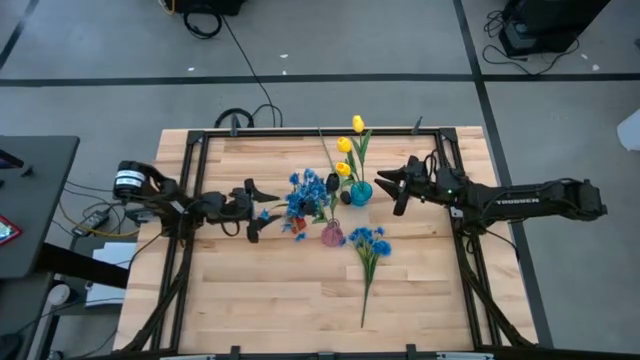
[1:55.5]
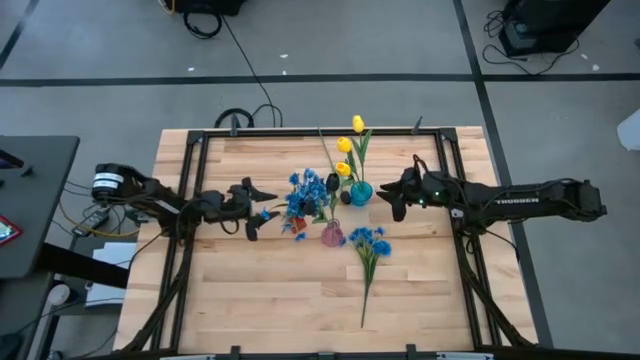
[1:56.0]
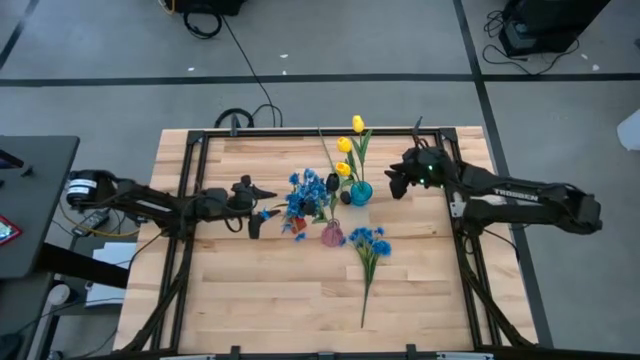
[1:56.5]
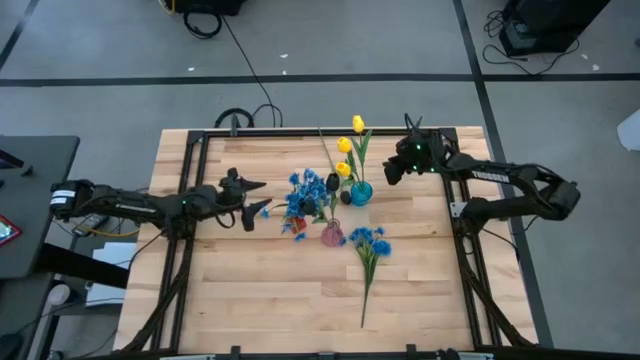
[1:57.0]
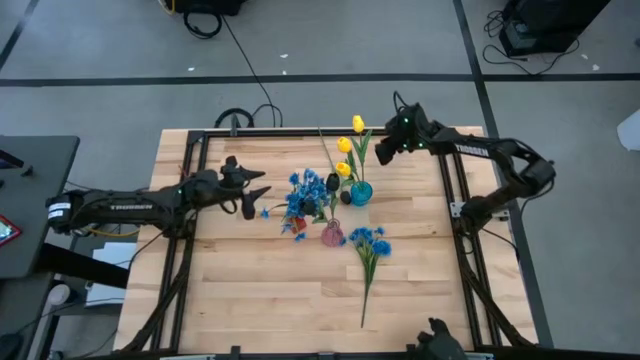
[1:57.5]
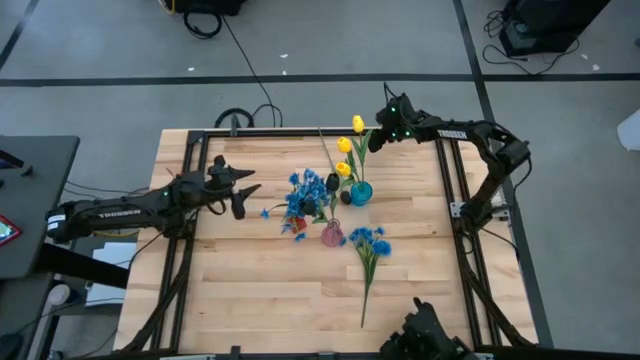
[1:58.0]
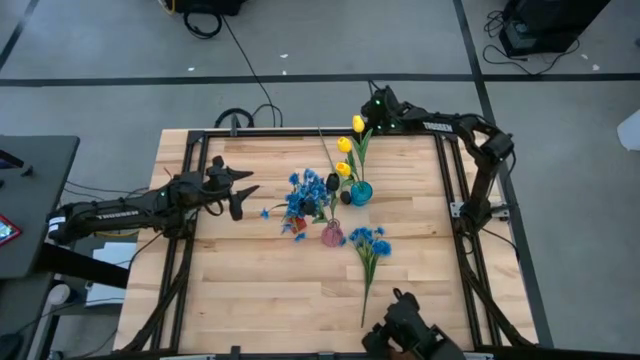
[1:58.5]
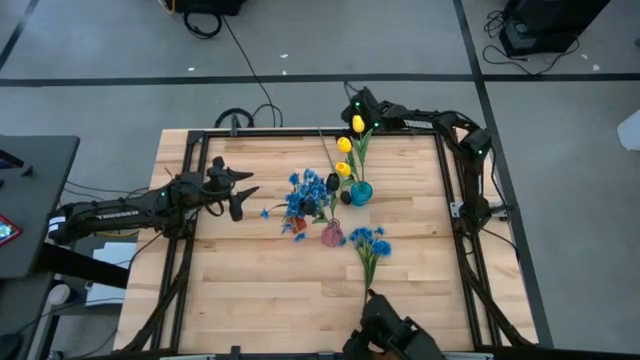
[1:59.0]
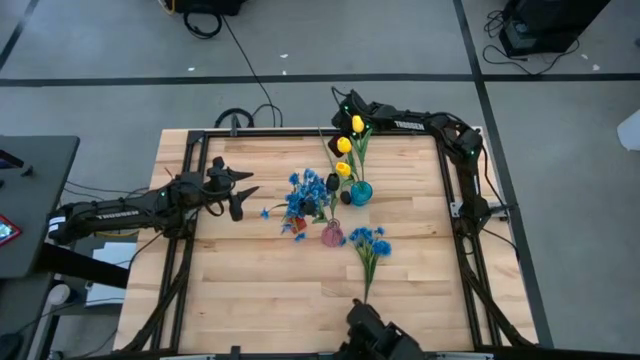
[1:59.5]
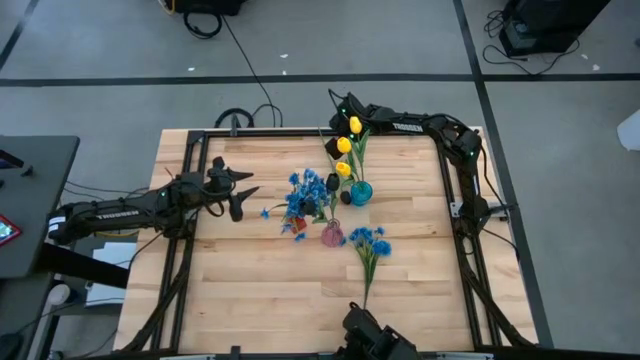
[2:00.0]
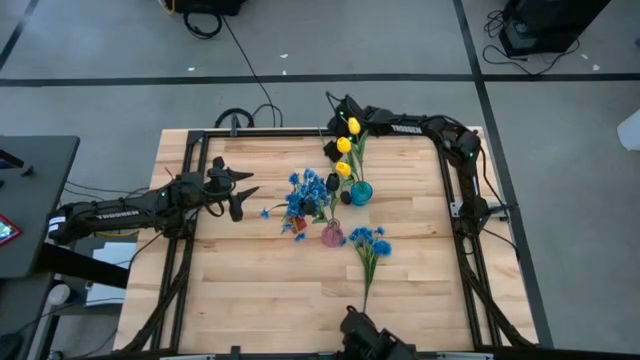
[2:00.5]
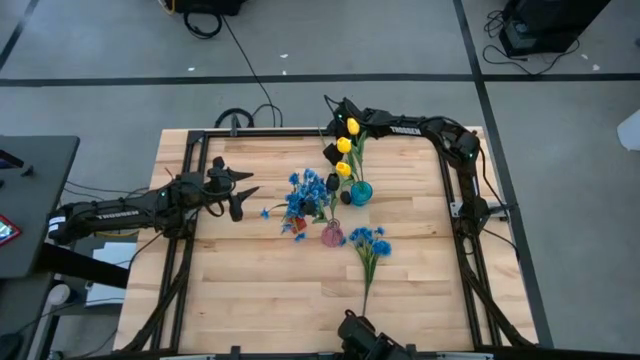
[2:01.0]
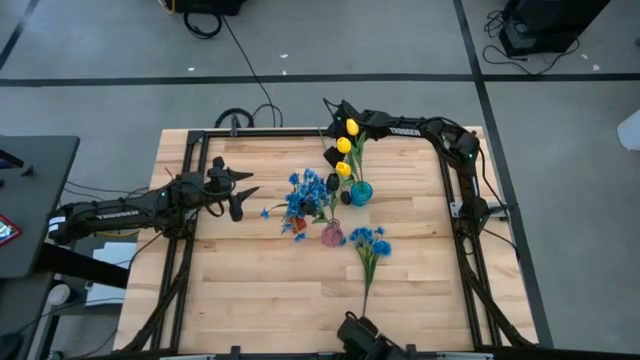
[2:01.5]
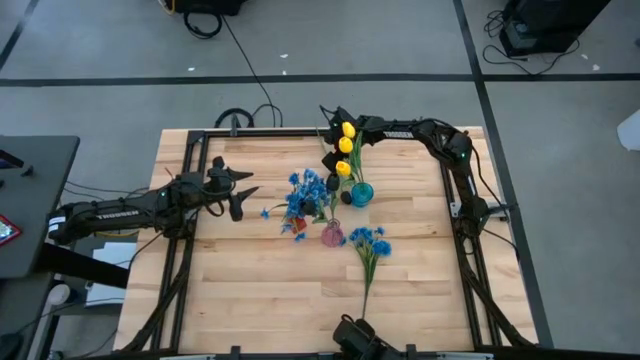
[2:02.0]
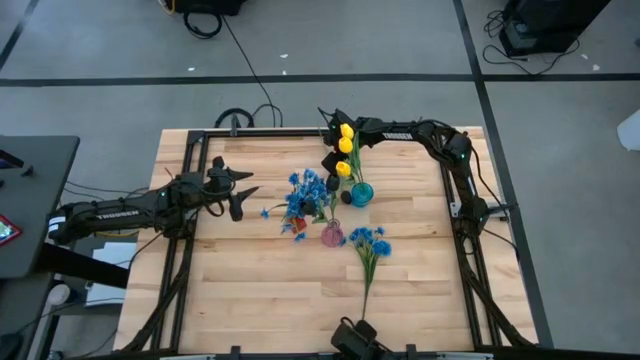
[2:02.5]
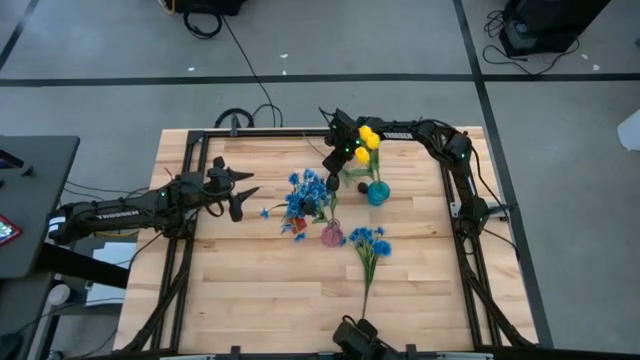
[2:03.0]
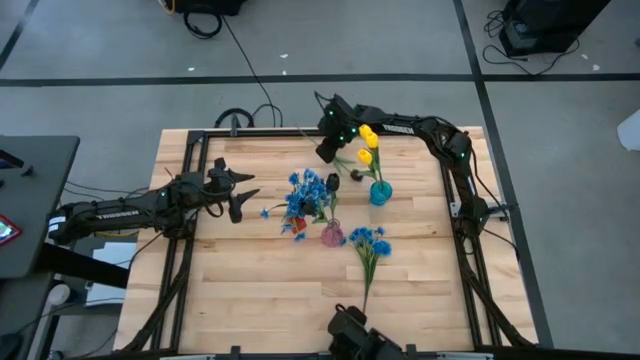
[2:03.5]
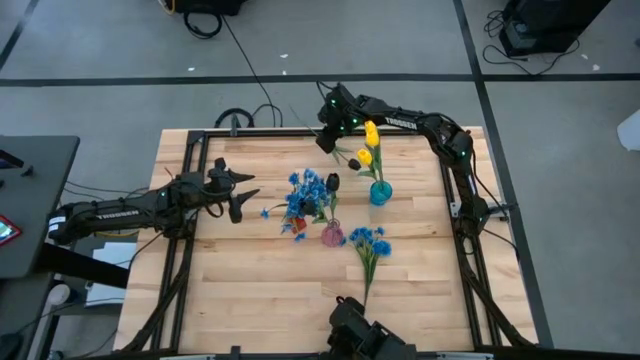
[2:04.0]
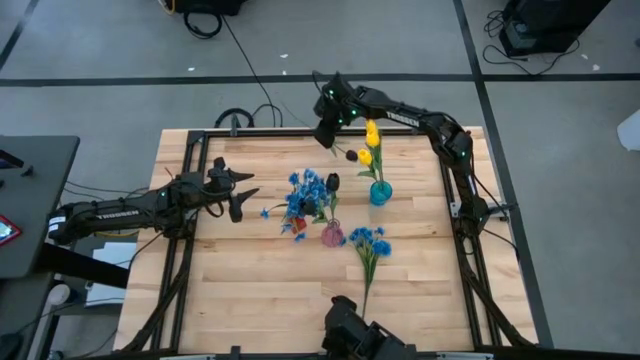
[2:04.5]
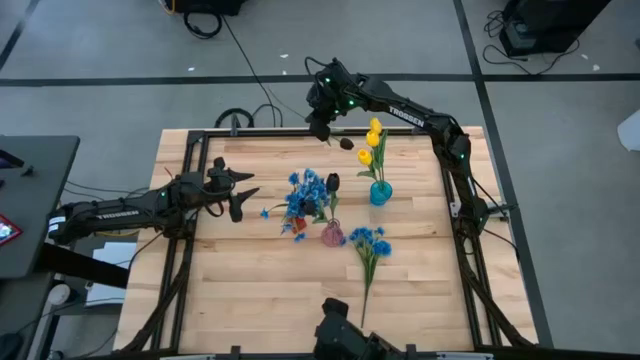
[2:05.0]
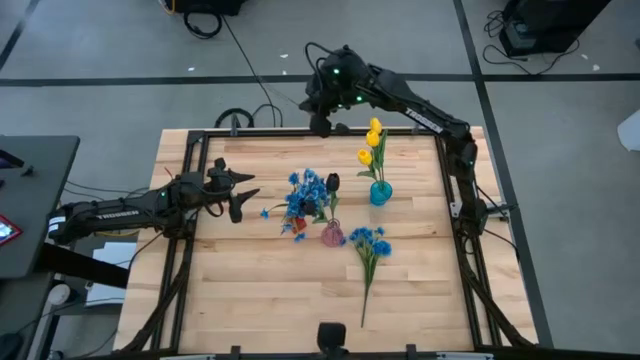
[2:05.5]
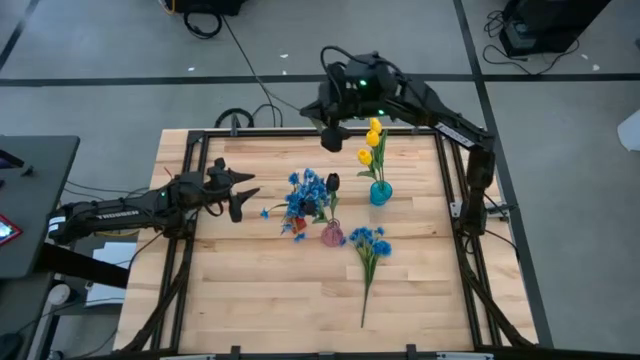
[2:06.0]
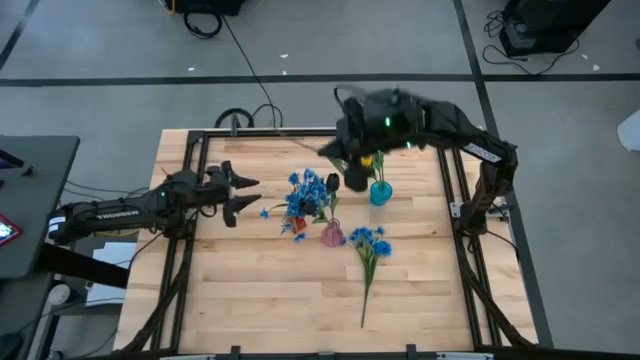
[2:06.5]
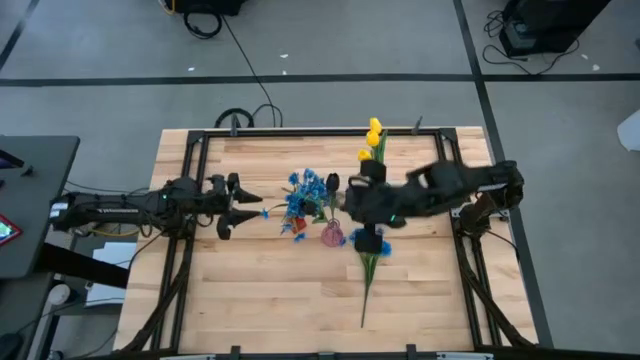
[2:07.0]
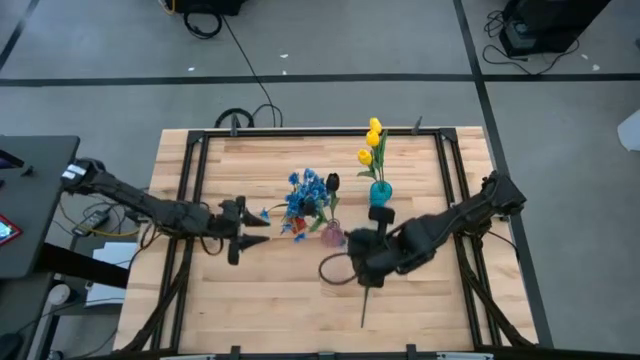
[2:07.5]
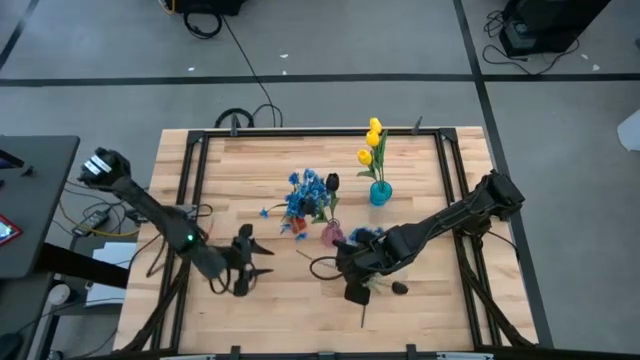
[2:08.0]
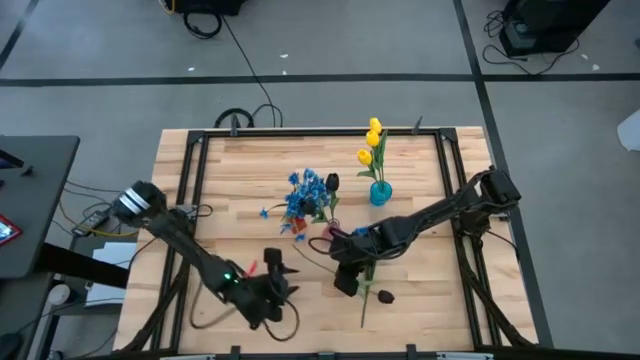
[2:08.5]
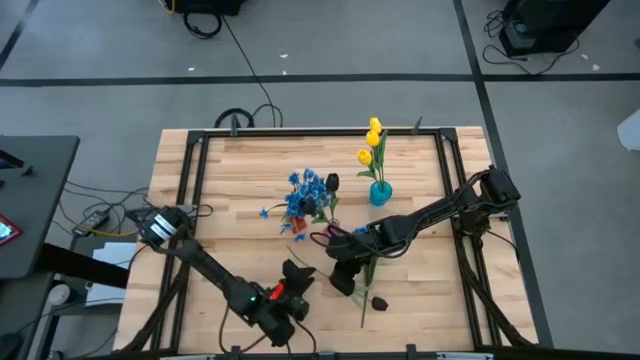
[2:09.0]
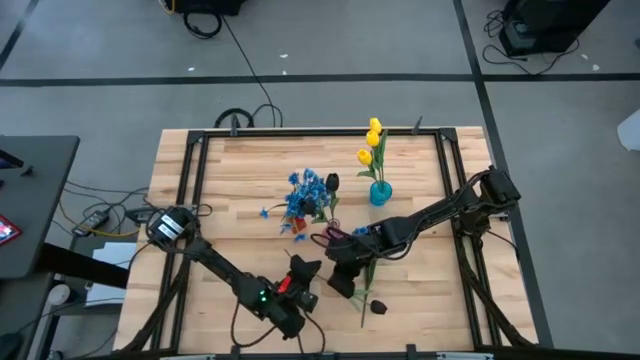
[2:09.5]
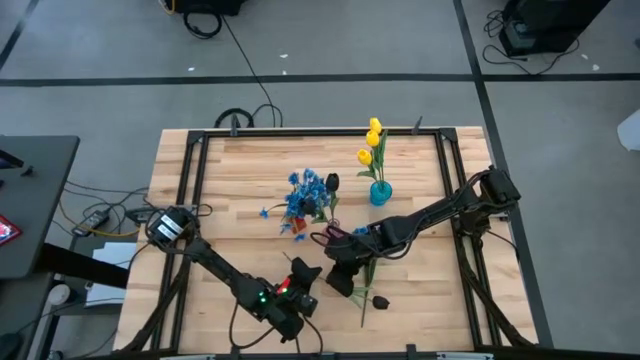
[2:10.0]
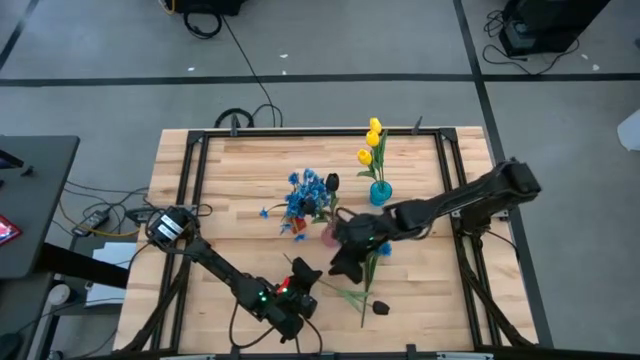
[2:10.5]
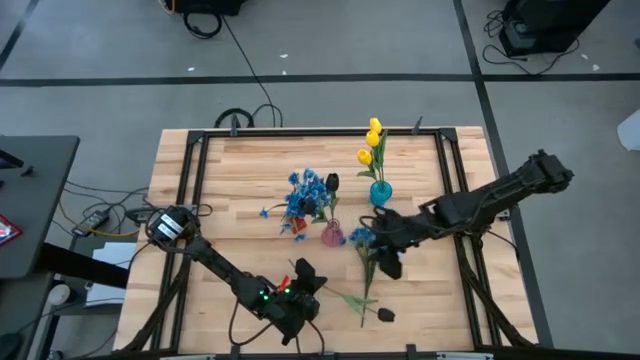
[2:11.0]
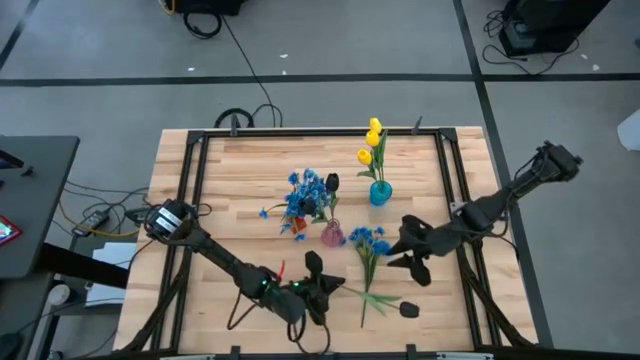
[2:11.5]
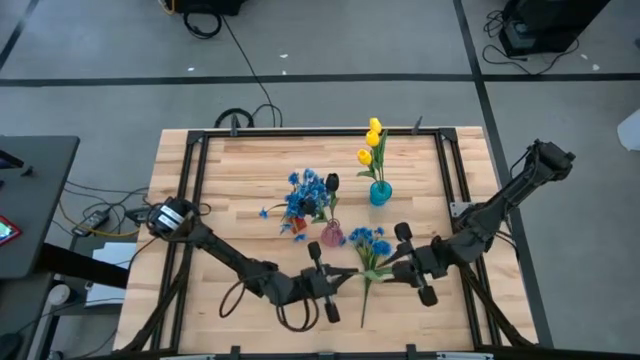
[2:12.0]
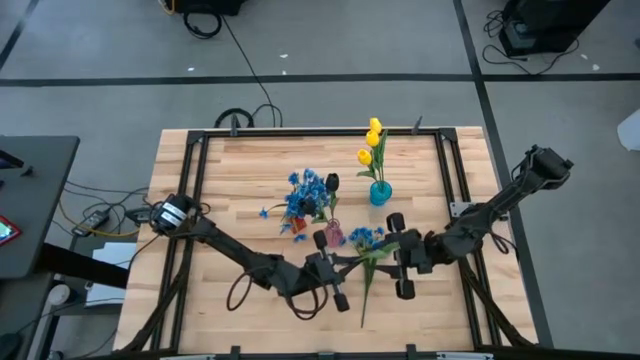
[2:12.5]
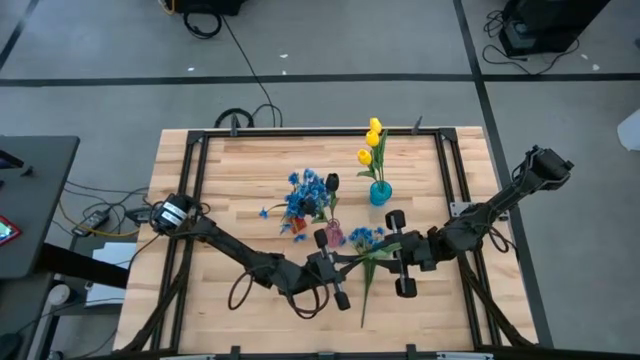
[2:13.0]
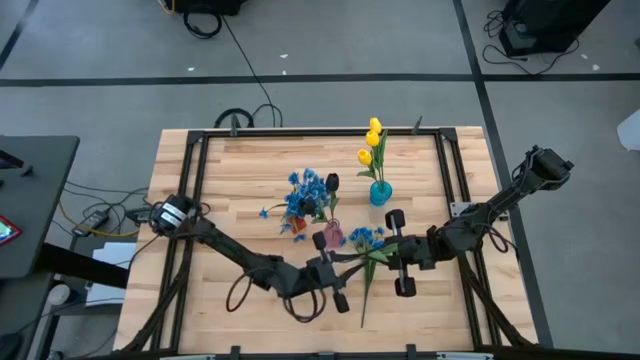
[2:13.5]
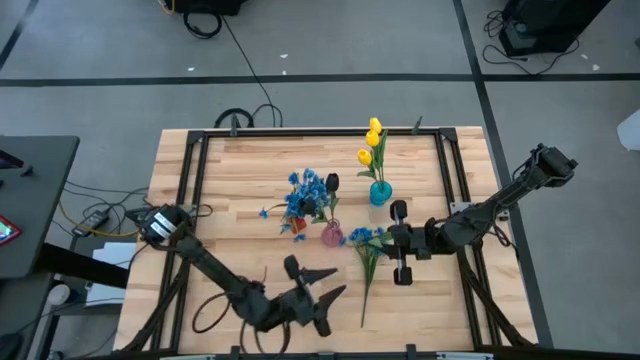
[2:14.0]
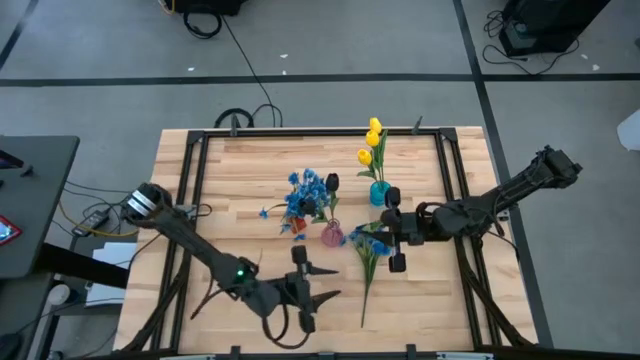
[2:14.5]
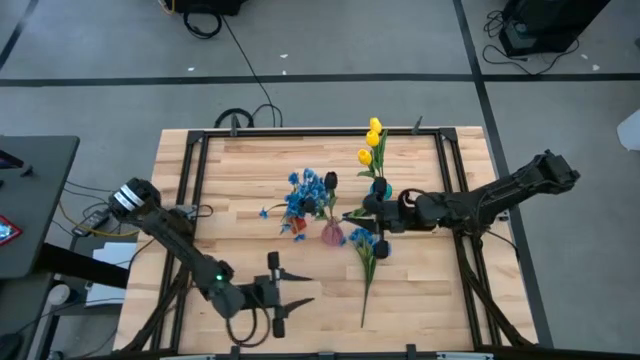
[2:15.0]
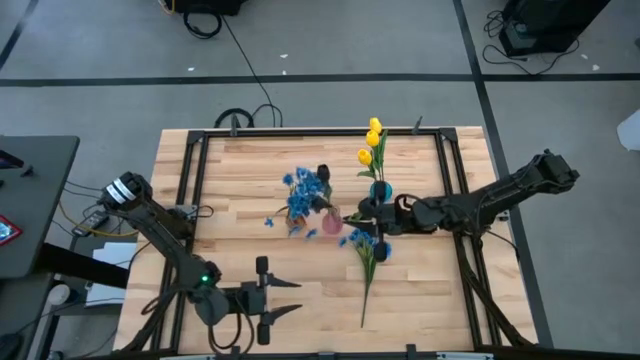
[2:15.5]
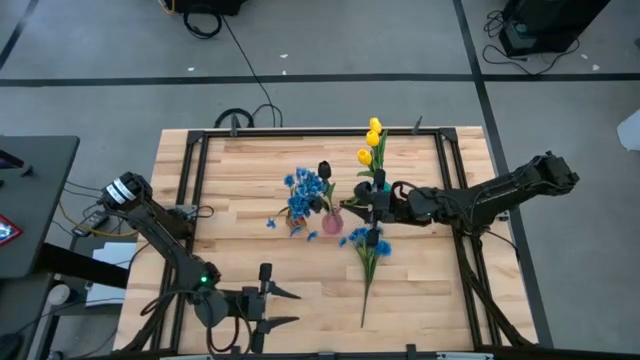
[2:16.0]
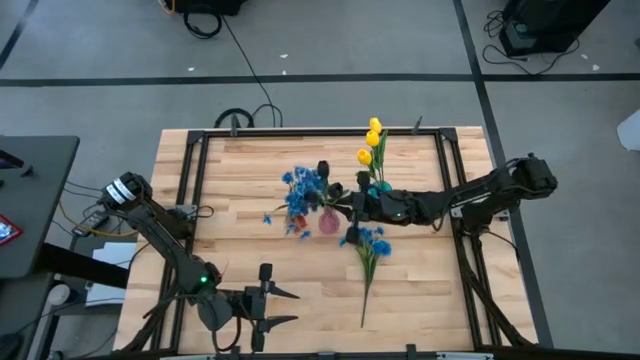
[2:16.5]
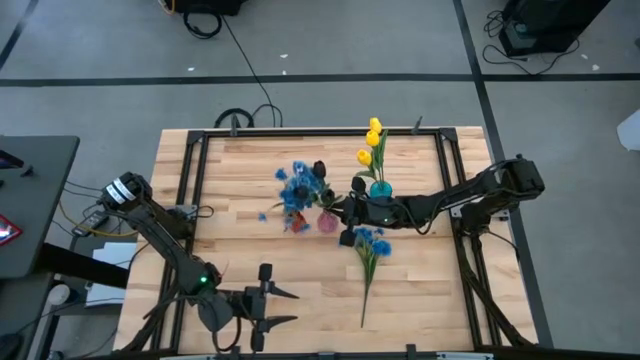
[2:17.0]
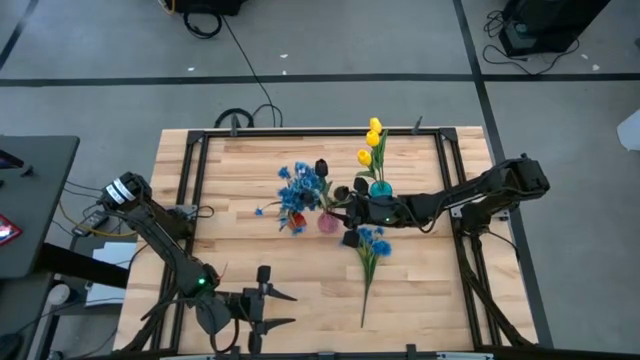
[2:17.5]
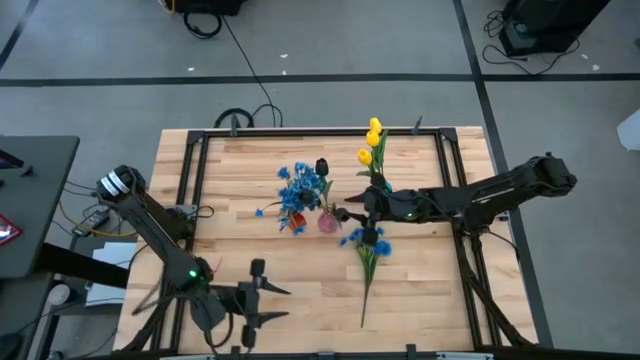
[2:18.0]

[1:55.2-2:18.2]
Task: Sort flowers into vase by color
Put the black flower into the pink vase
